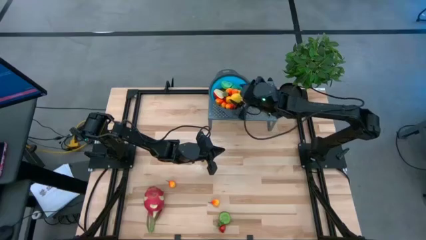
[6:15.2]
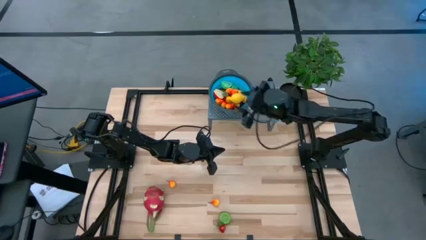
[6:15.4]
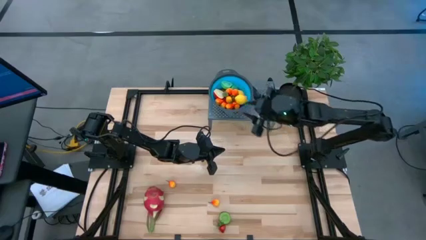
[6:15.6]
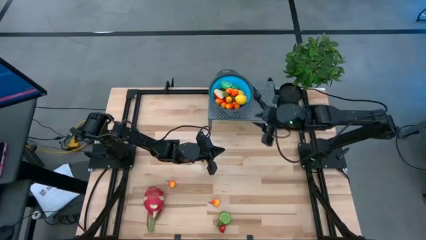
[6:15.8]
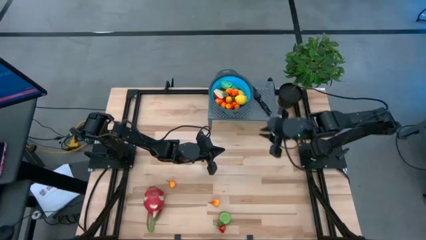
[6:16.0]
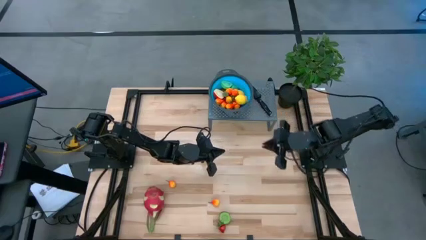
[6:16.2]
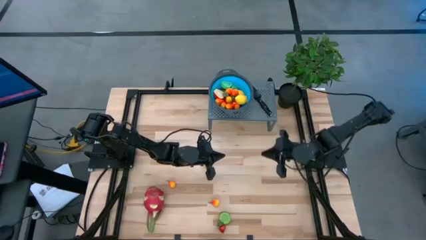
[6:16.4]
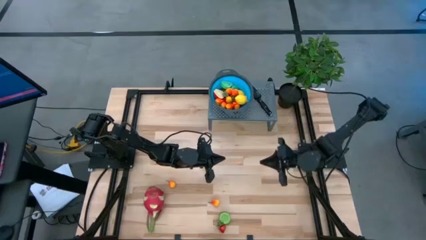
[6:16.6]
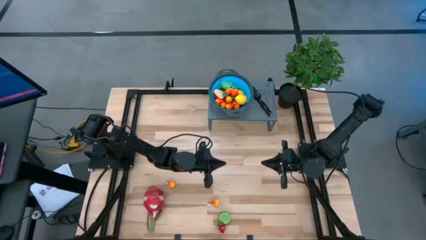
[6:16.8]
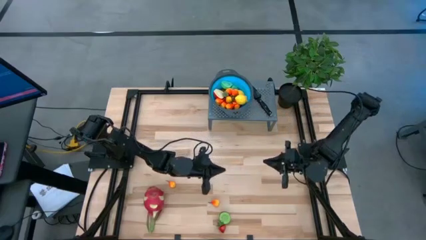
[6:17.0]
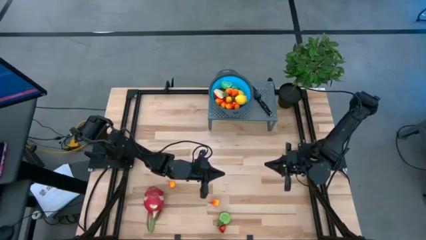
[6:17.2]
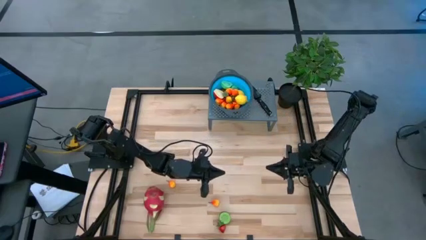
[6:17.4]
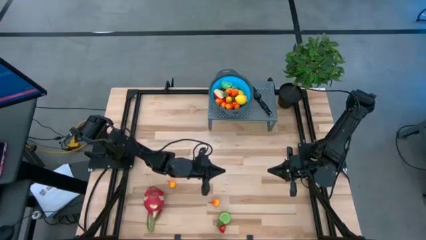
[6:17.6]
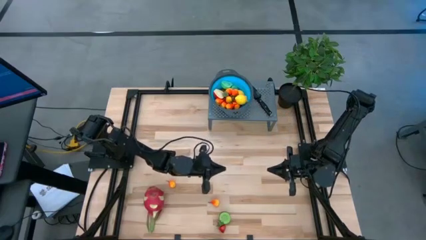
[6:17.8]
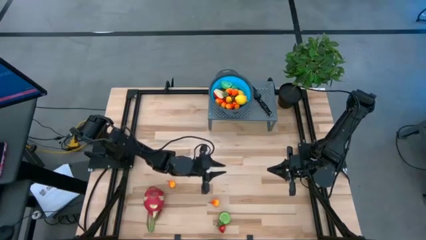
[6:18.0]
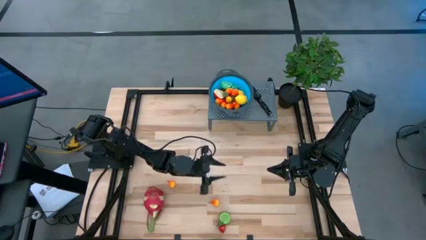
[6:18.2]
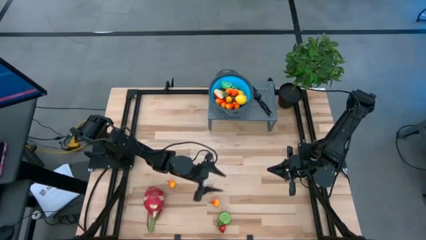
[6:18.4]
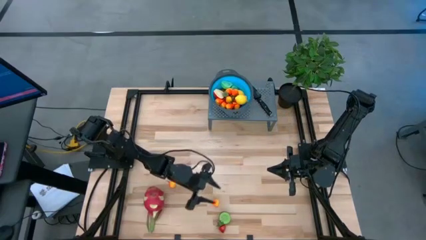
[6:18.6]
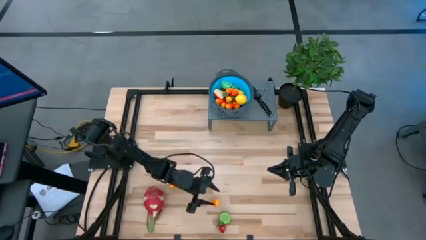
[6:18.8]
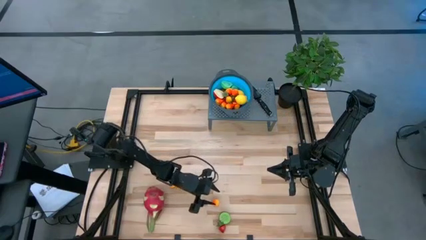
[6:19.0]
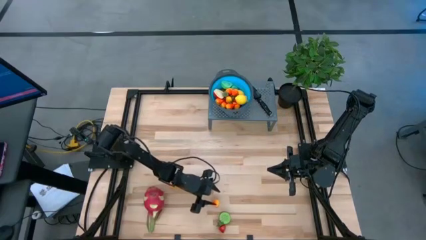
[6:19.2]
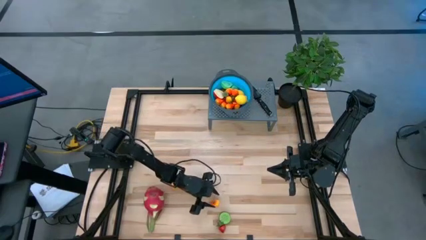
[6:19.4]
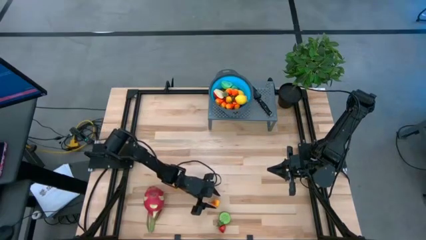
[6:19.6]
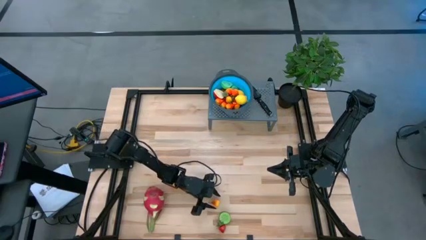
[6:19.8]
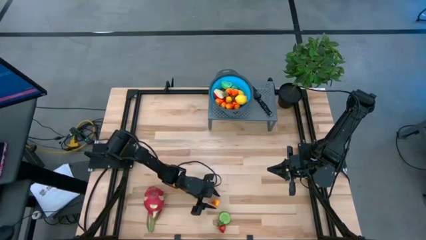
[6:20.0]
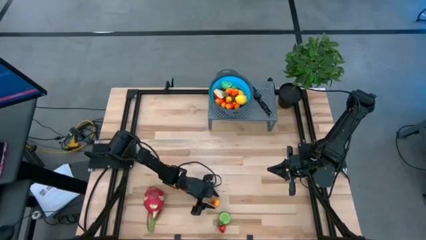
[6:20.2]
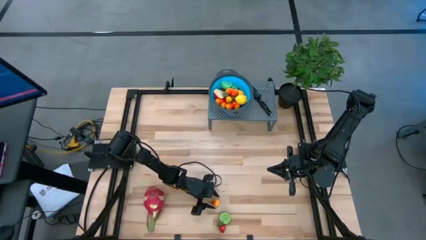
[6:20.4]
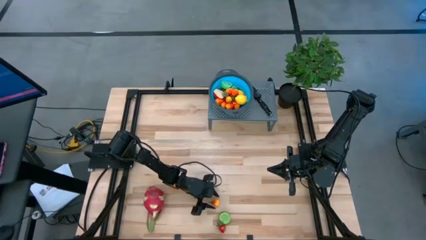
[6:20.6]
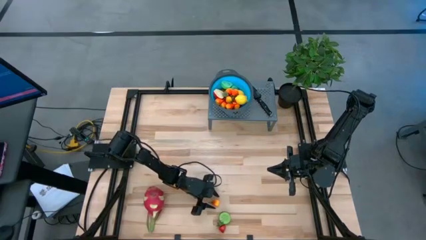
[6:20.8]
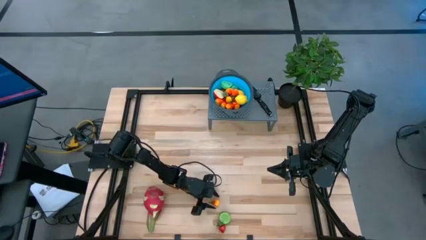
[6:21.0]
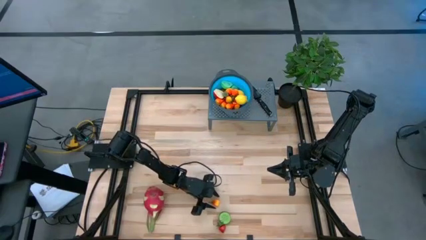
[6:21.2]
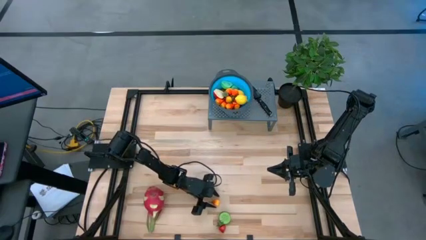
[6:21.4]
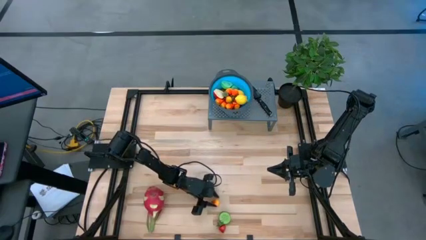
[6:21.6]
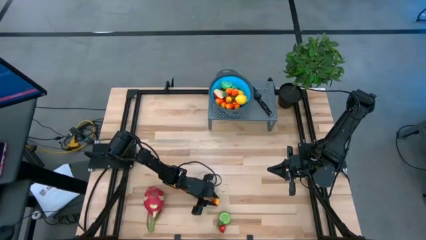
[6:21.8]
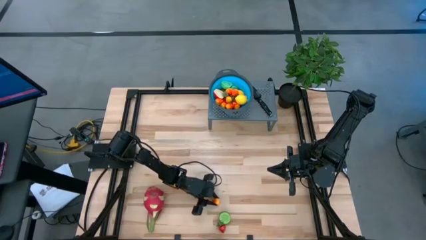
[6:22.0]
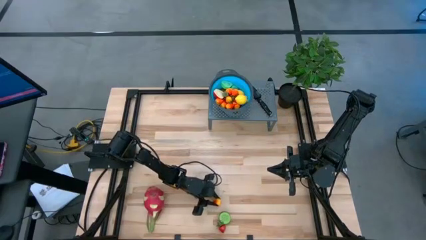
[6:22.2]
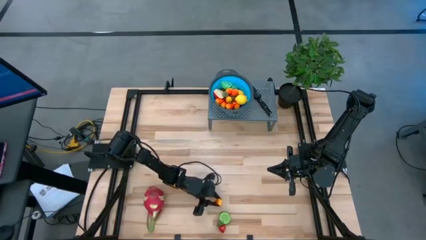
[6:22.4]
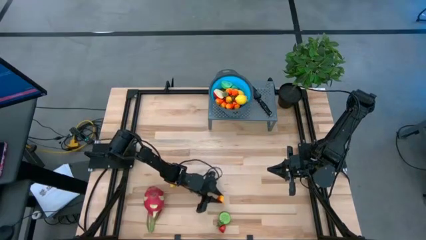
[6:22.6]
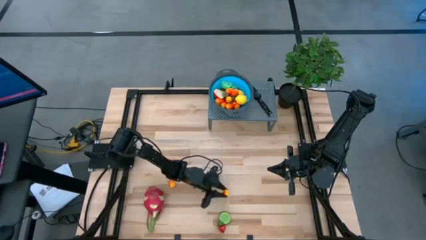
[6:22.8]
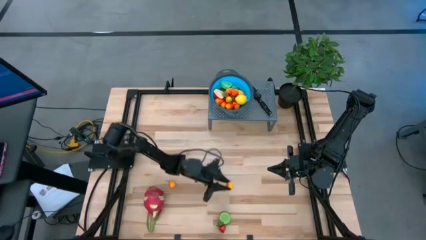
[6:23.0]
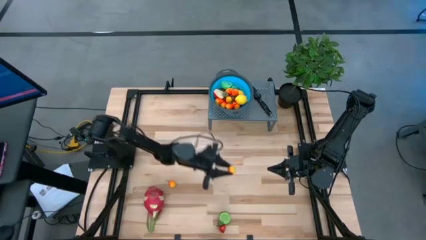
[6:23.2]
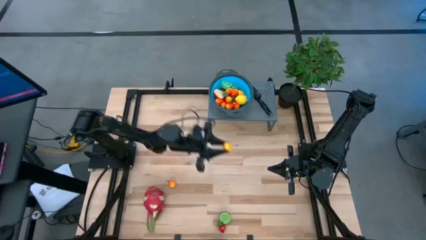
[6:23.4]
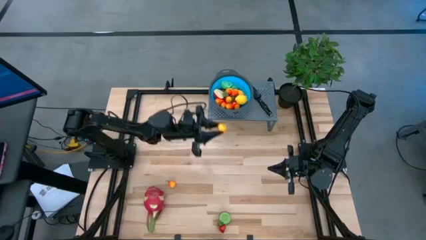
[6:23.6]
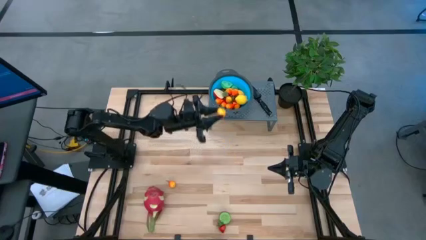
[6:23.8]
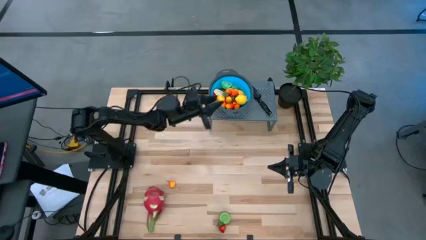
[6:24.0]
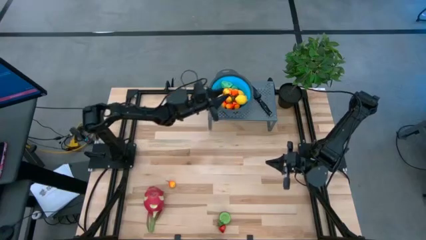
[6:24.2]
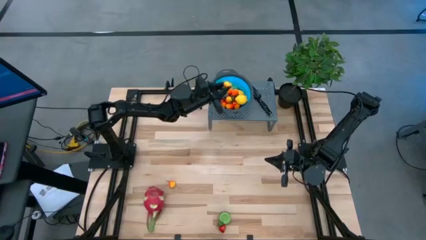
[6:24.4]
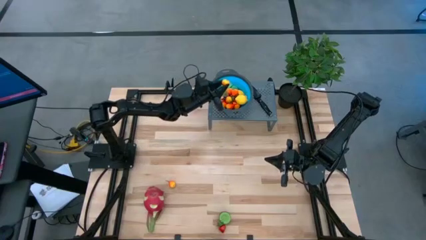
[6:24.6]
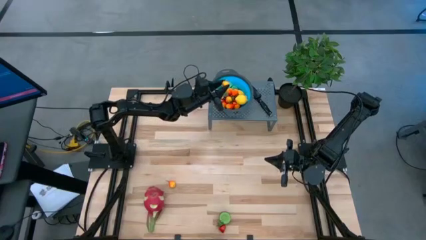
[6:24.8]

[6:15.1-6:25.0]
Task: Pick & Place Fruit
Put the right yellow pear into the strainer bowl

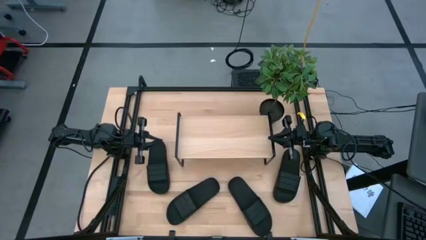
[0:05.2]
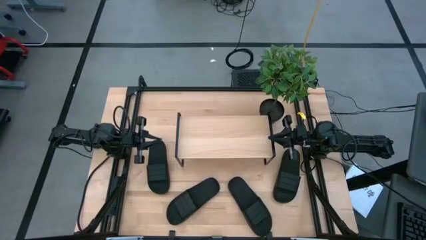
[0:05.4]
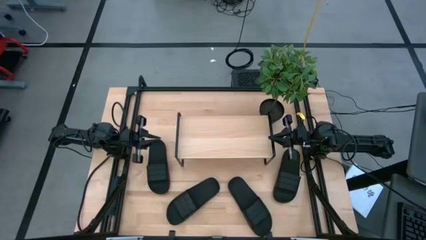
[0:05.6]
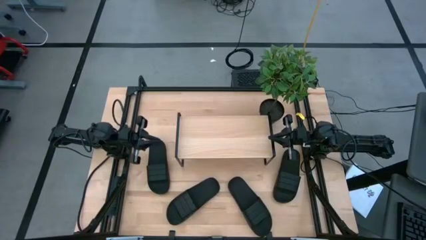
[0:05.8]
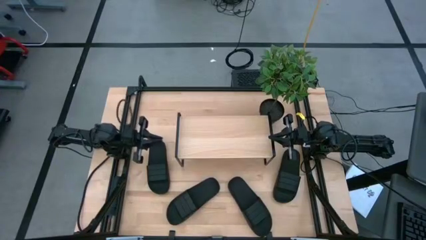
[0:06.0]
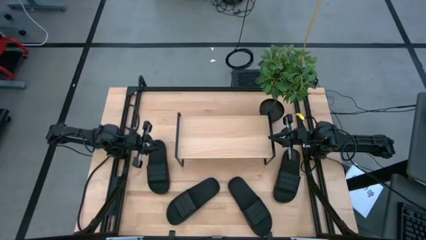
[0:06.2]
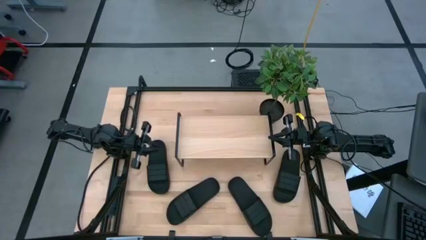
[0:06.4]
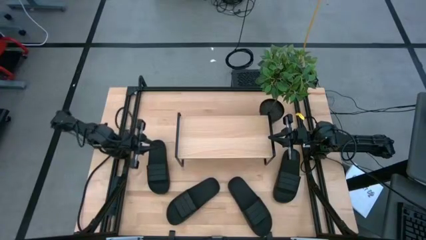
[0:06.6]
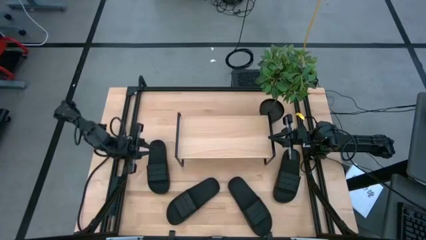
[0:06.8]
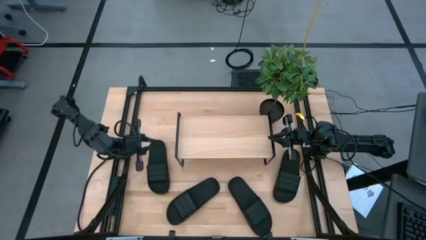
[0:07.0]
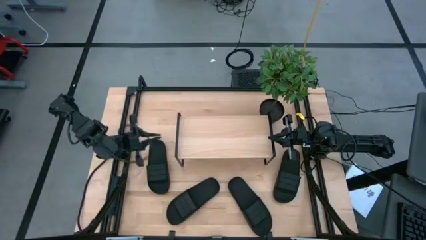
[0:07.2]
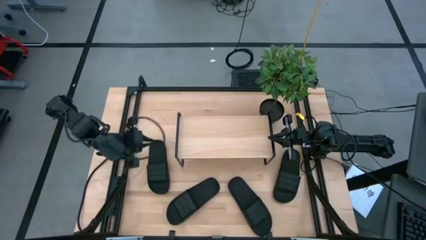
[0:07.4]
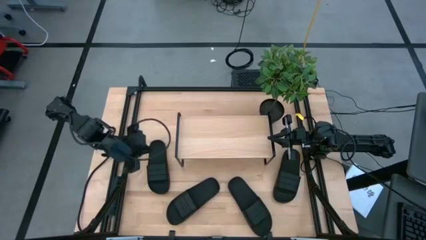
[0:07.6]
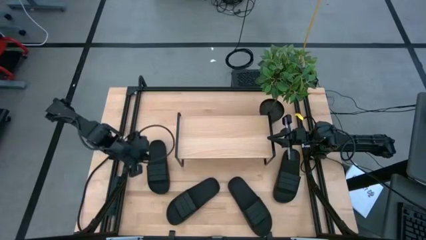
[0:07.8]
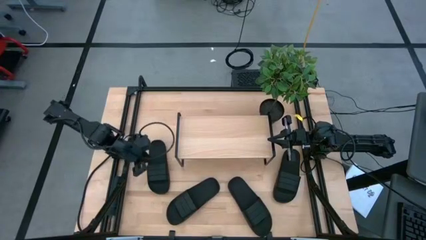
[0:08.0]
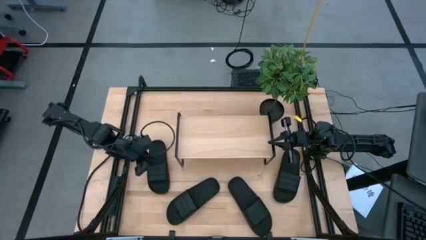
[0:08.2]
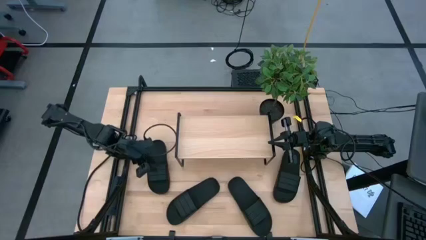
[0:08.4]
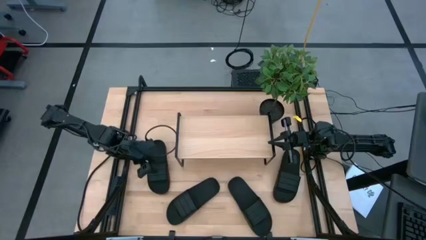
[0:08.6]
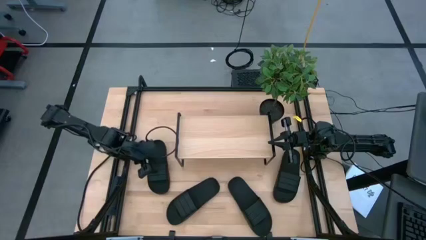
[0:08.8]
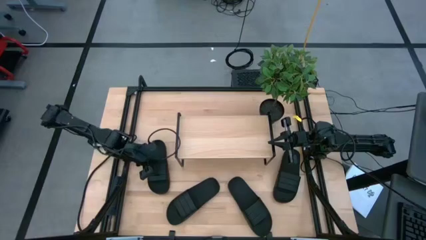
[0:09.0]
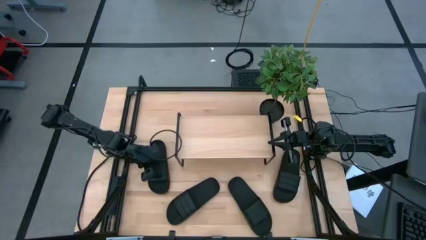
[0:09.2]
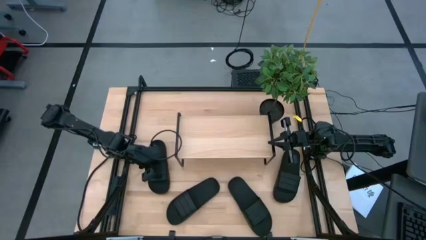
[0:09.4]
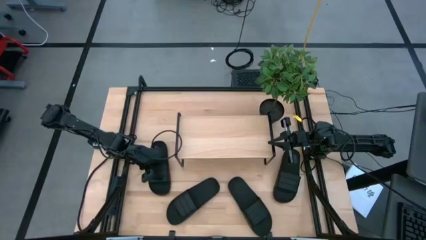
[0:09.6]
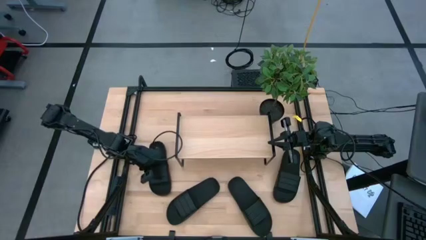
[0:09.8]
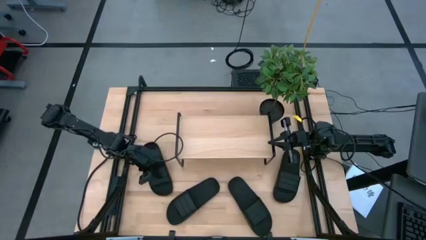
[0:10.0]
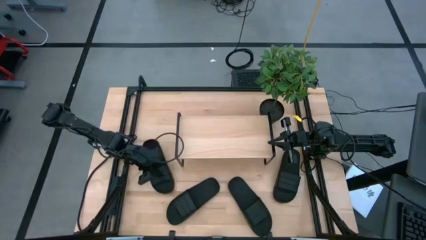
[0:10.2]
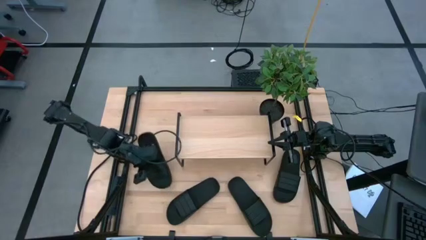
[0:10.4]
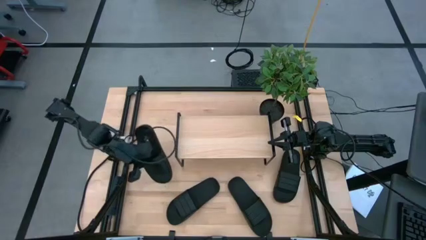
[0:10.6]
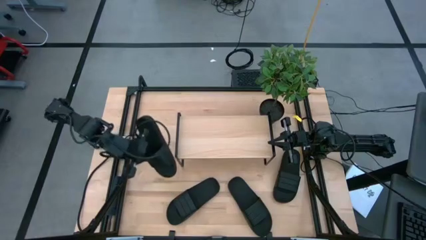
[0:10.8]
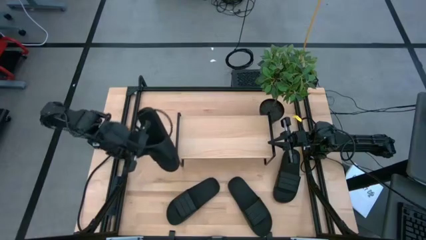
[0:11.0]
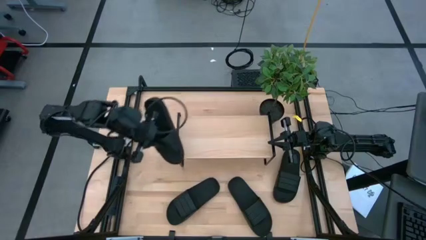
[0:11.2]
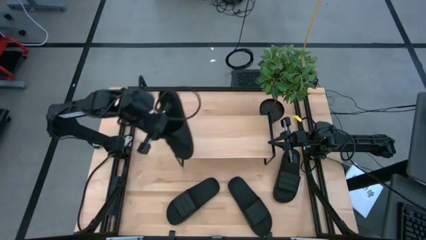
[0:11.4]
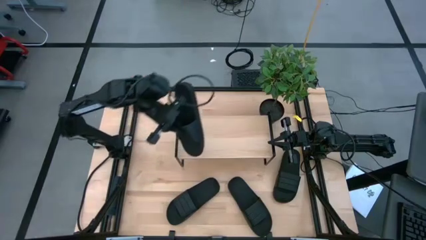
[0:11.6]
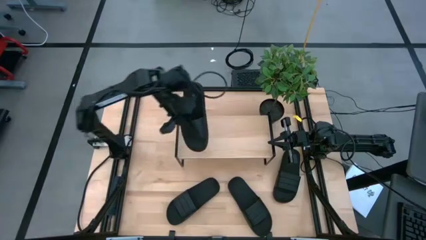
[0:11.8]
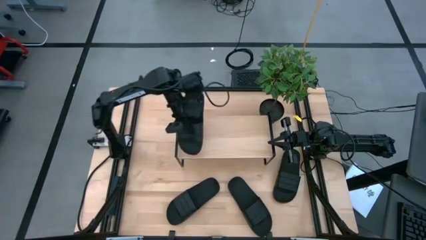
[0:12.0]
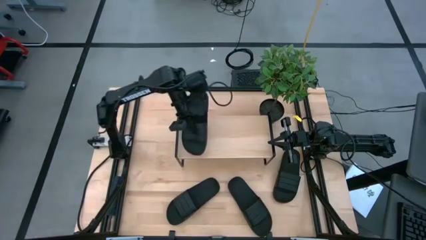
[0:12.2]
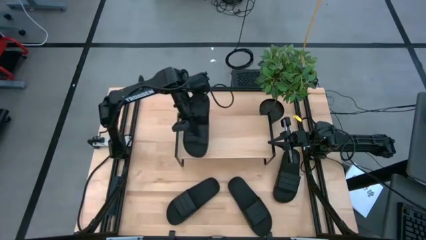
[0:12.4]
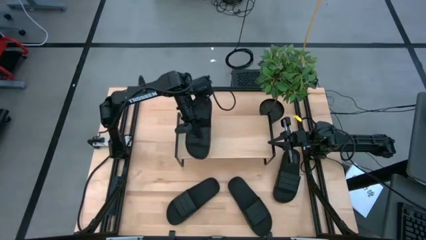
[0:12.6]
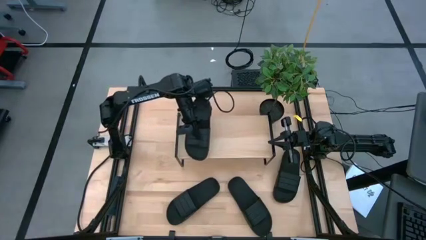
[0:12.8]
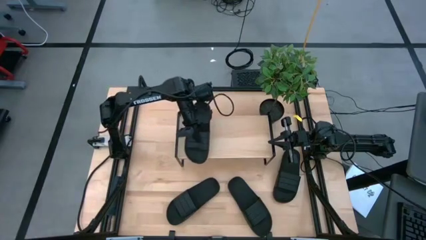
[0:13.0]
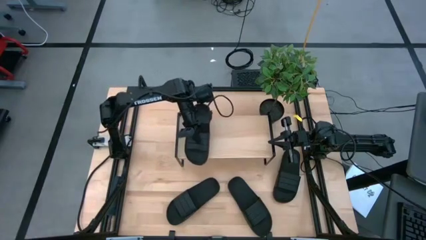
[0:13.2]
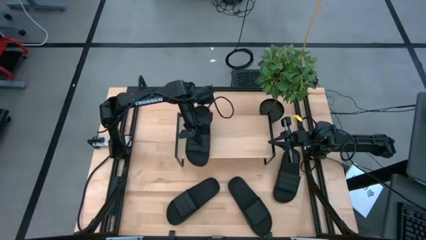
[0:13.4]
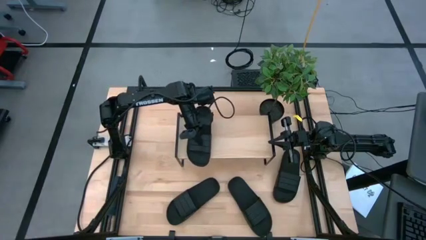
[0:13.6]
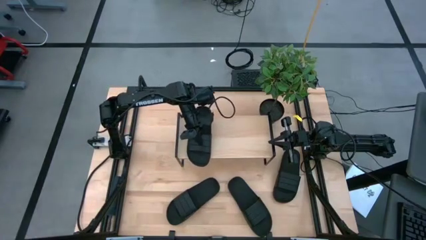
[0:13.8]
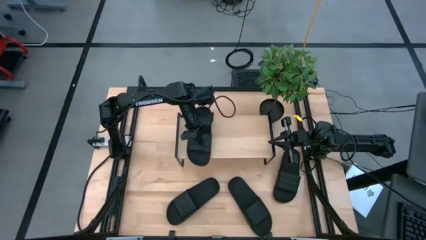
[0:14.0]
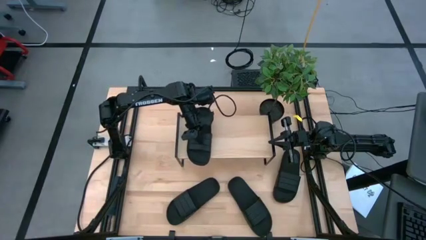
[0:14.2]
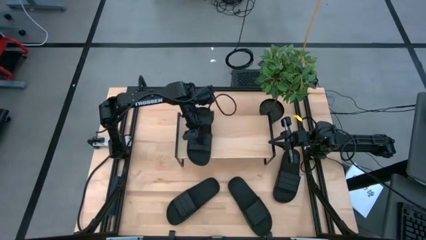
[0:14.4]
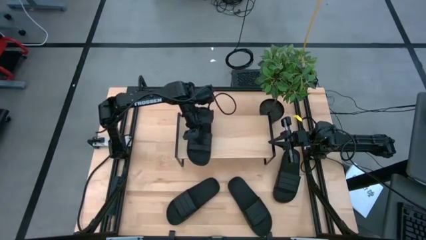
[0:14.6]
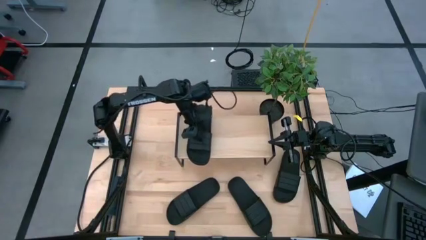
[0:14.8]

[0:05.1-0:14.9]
Task: Pick and place slides into the shelf
Put the black slipper on the shelf
